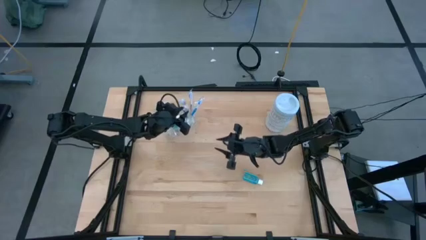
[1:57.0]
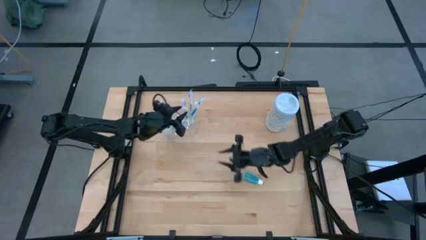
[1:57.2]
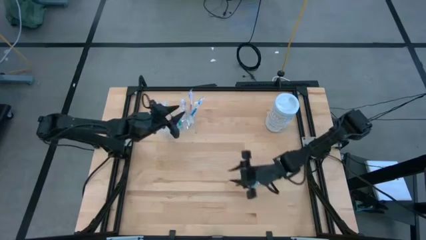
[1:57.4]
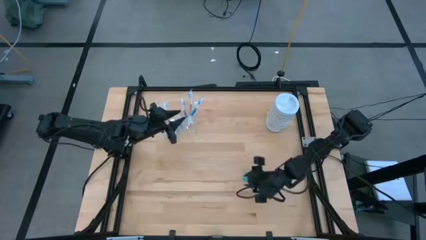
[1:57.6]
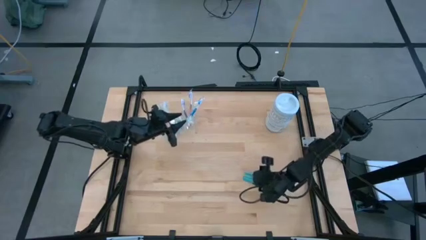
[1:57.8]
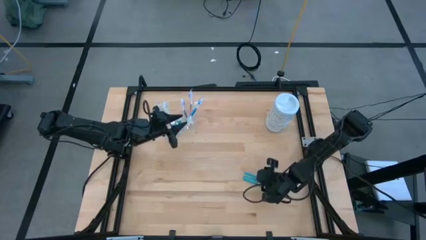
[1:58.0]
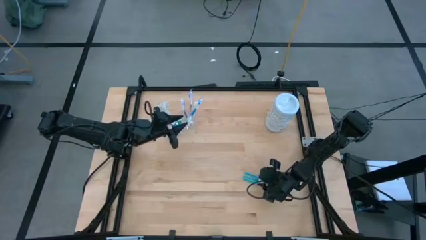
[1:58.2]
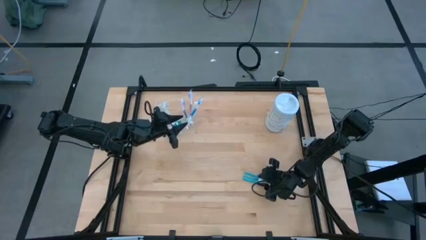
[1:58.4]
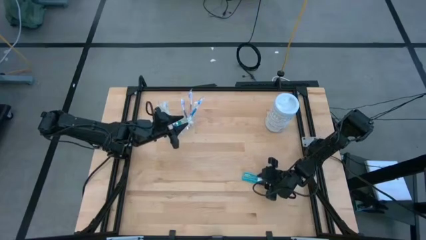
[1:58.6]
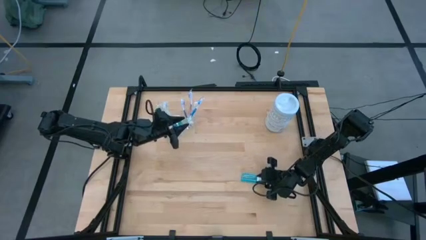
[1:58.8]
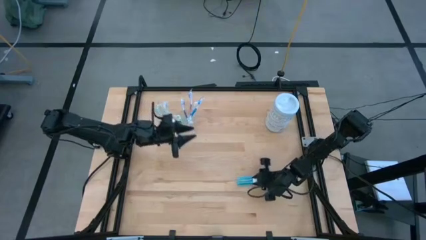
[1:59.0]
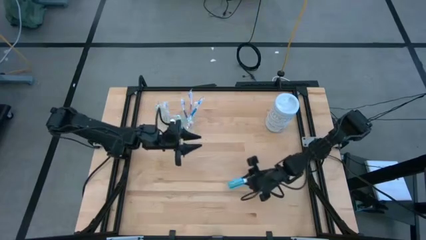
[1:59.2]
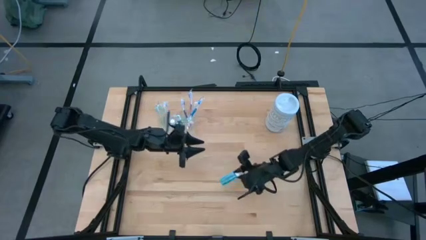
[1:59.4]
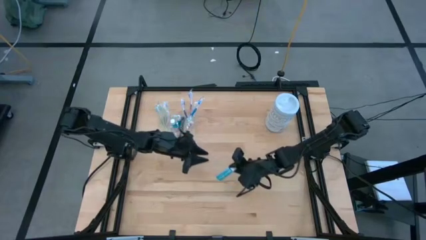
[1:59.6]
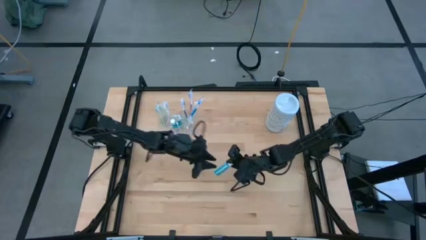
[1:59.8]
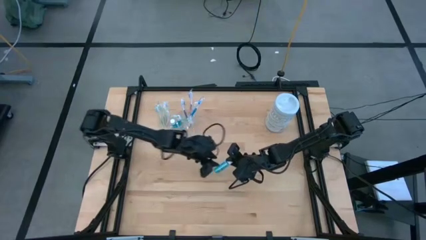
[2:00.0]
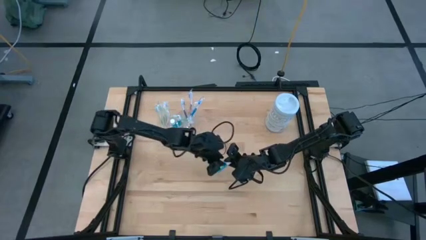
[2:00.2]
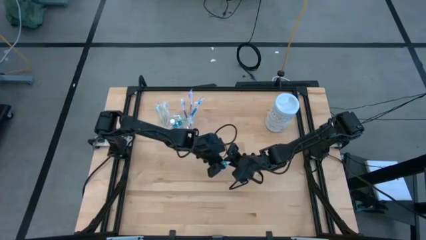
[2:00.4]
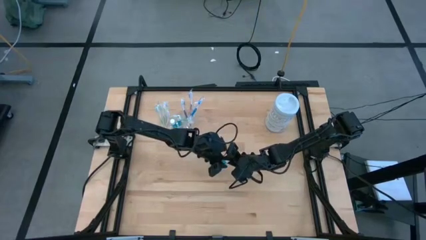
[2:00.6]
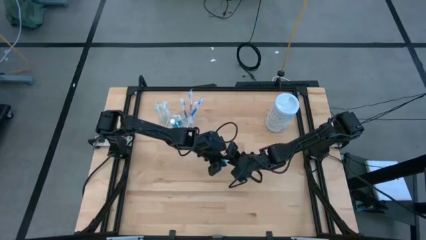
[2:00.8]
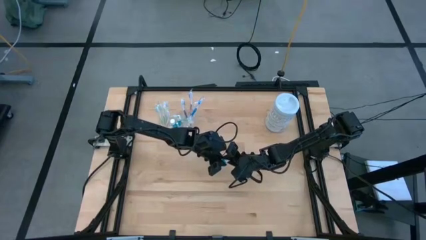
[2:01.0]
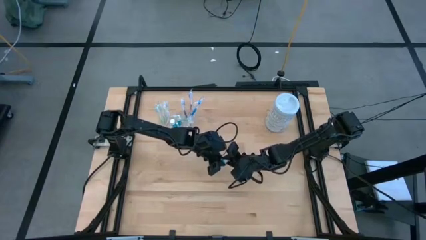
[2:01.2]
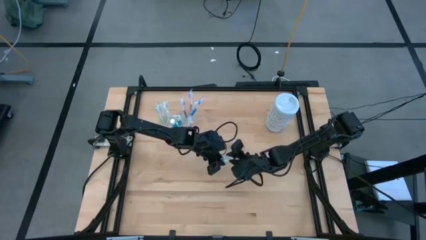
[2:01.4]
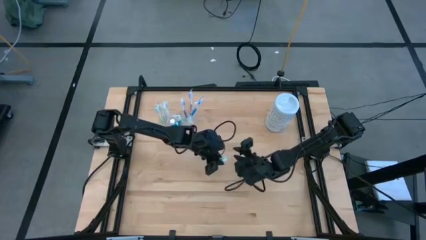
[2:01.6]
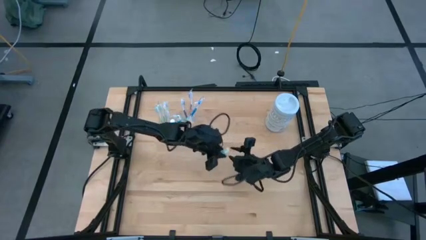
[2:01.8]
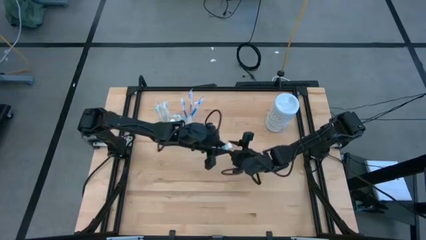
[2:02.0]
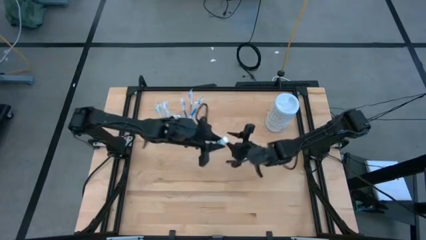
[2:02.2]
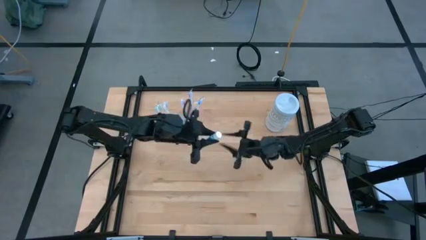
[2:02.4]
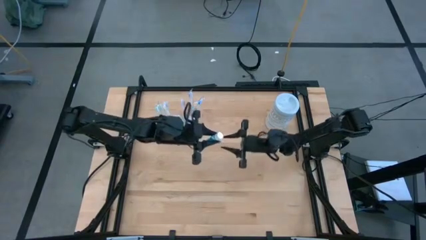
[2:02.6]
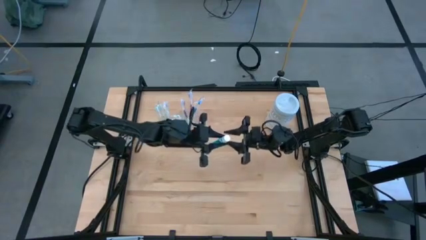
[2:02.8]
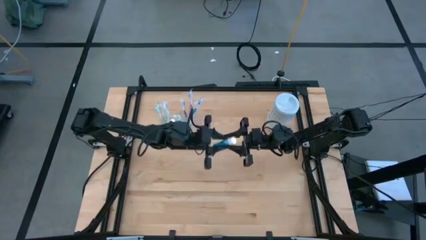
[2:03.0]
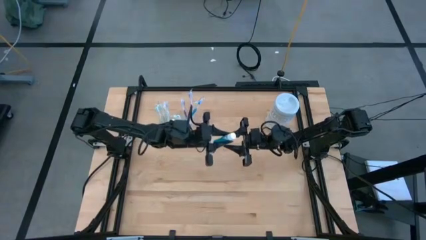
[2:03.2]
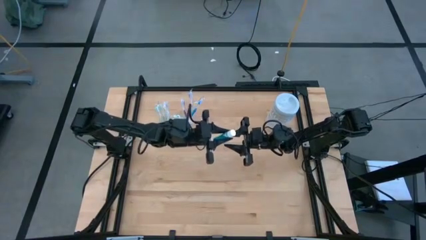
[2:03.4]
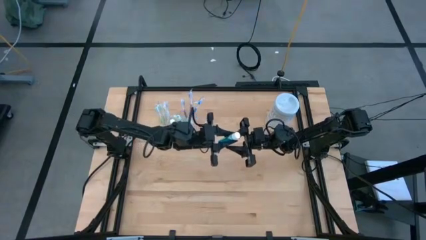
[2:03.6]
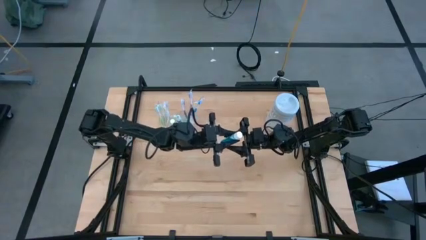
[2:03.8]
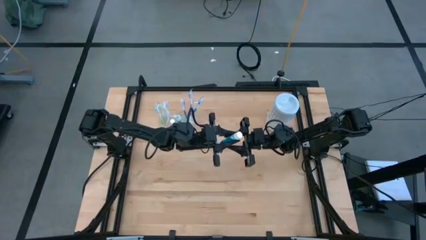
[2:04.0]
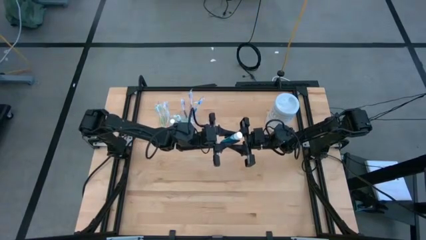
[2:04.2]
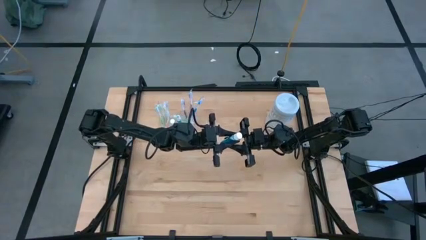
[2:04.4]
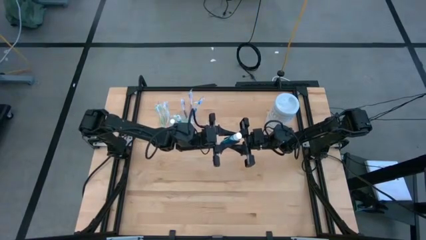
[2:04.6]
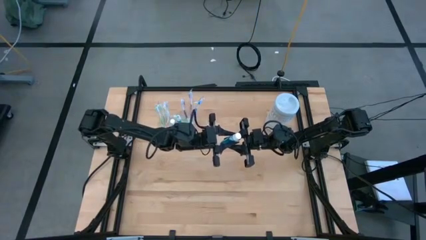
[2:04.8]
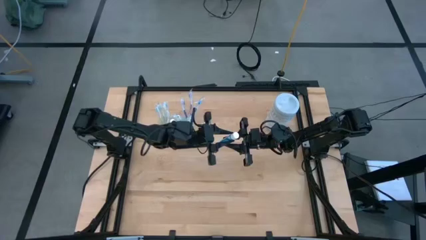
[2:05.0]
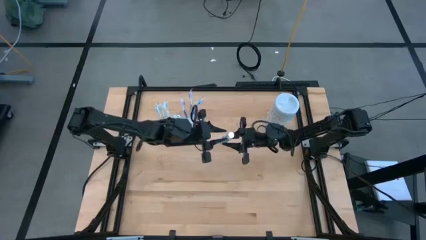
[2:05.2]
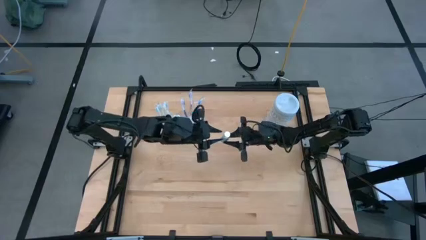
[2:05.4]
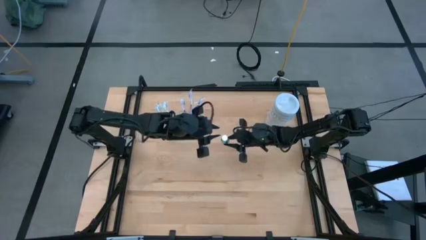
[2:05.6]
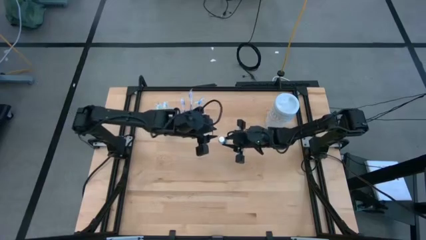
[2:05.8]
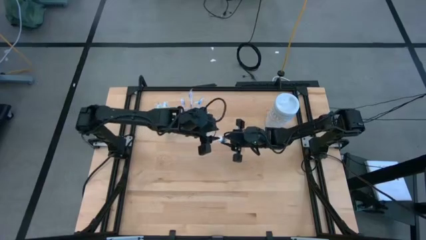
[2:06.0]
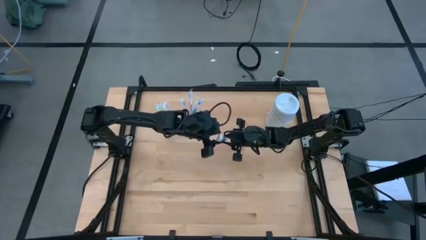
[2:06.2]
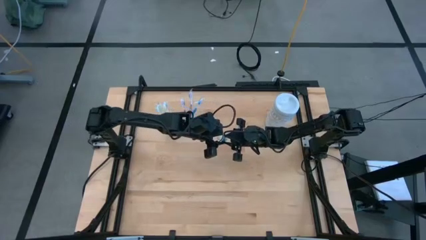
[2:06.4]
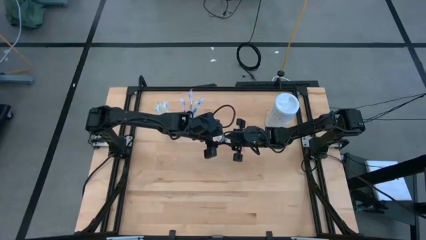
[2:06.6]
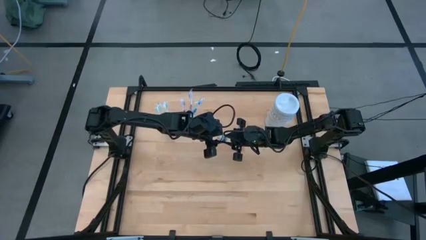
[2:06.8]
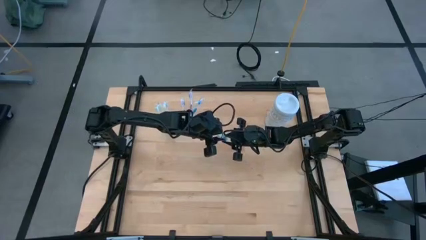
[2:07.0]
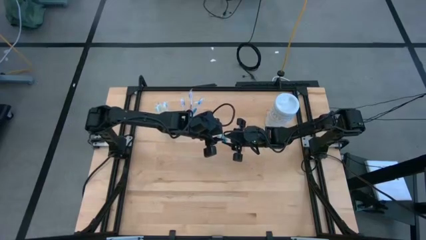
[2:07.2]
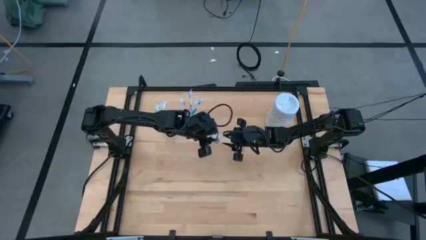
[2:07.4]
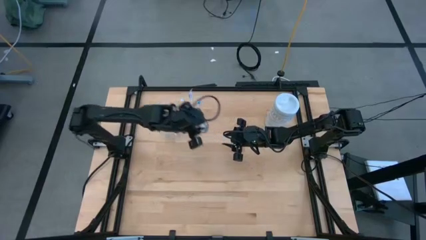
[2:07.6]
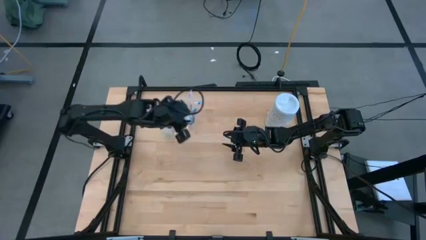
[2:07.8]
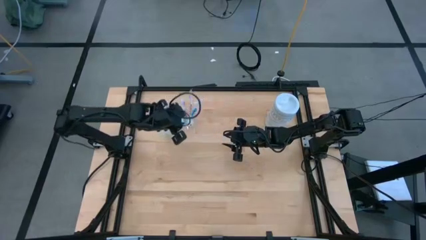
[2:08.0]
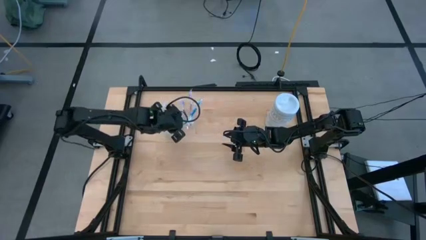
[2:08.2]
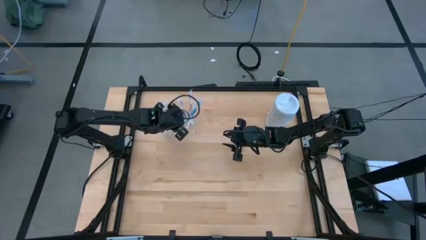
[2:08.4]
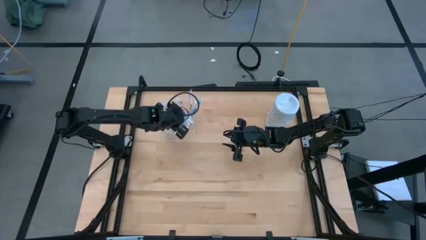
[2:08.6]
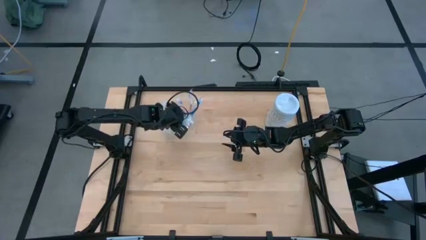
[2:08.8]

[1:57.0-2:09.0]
Task: Pick & Place toothbrushing station
Put the blue mouthwash into the transparent organizer

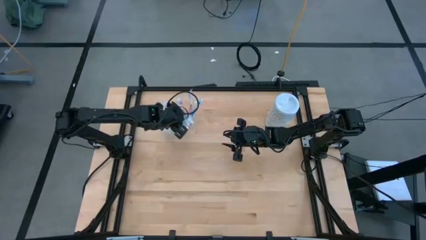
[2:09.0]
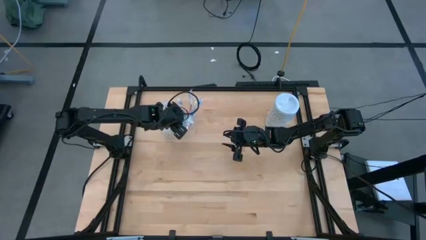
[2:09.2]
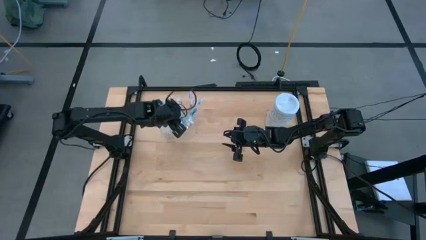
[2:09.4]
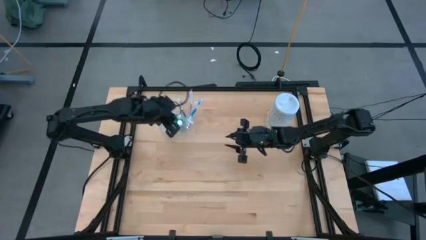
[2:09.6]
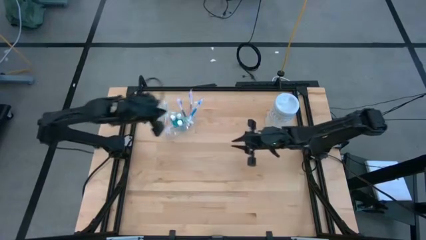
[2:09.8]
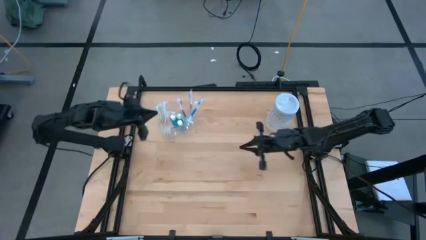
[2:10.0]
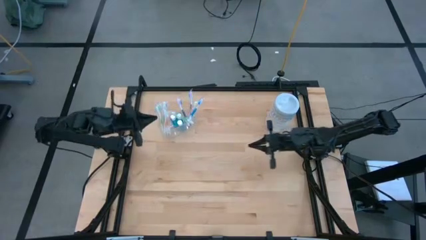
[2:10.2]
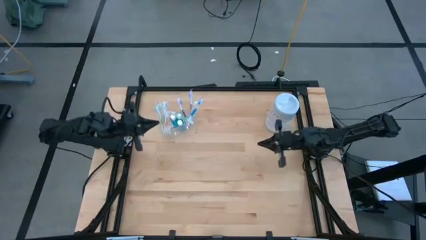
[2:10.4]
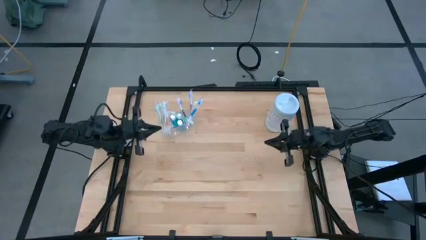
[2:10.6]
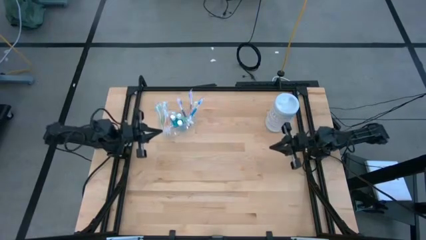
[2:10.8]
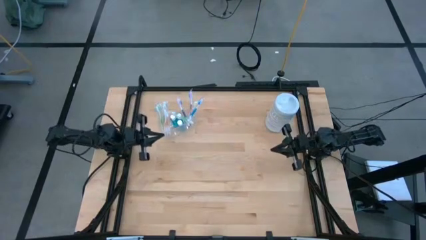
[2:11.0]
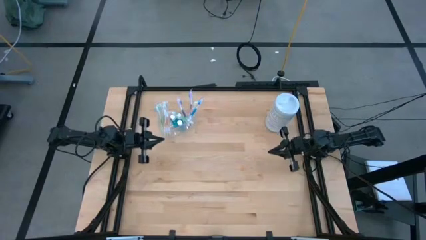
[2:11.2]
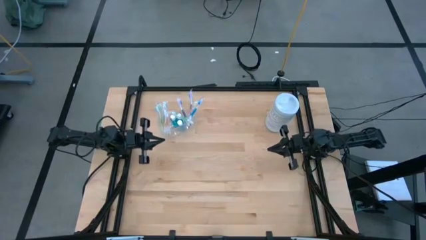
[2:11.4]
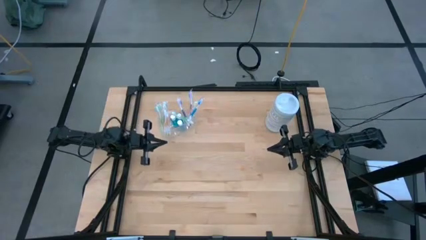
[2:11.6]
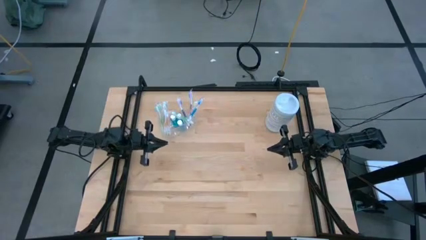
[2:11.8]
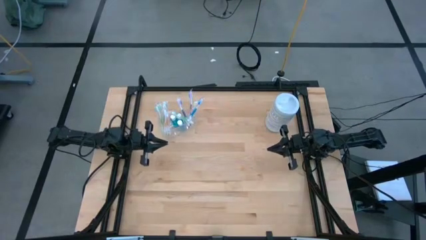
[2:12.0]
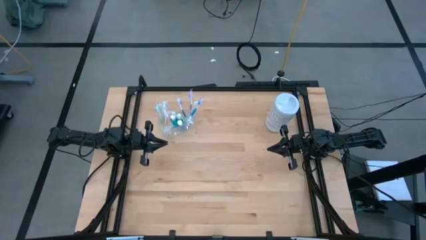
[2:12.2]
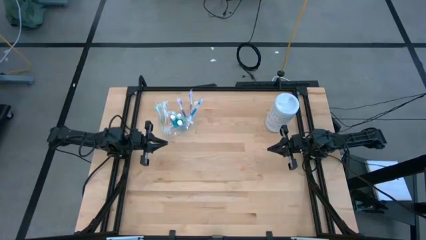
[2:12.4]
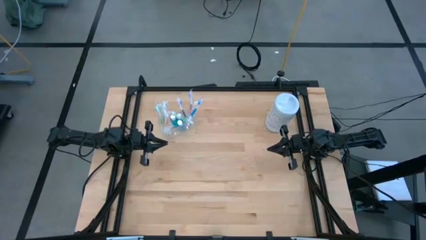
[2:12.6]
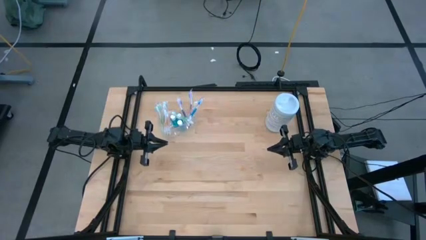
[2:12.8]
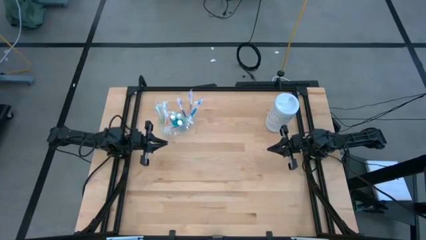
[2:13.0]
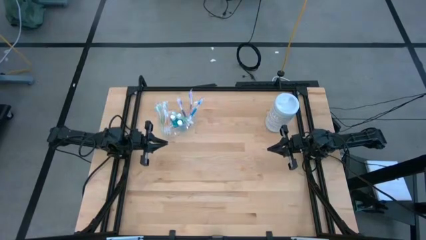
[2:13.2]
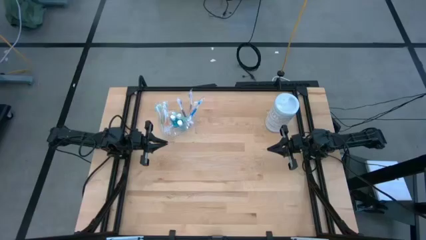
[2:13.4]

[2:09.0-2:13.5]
Return to home position
